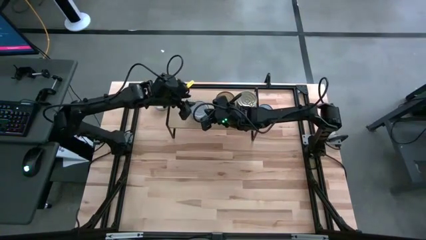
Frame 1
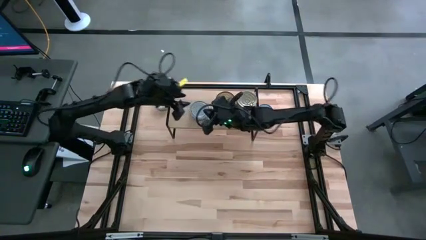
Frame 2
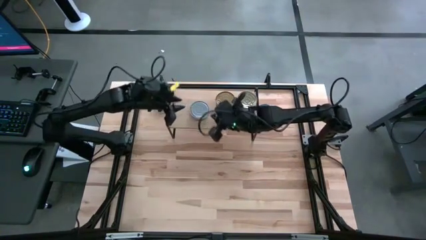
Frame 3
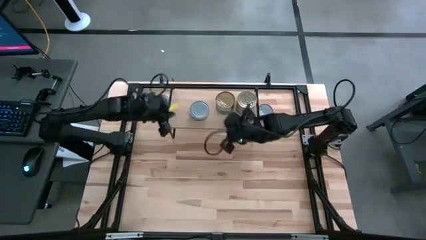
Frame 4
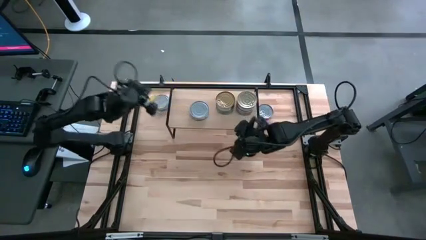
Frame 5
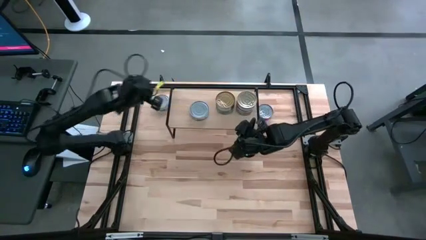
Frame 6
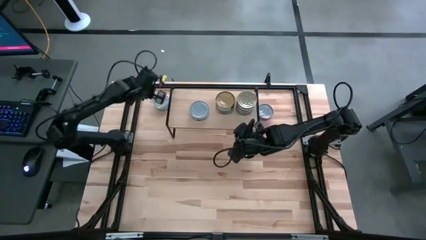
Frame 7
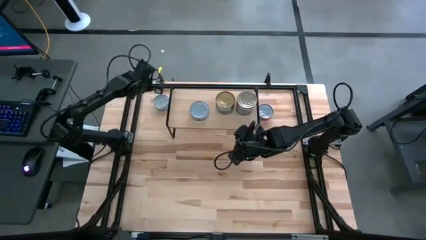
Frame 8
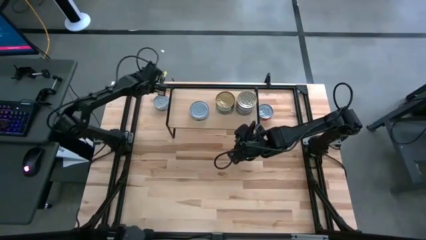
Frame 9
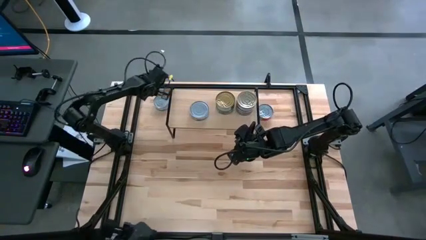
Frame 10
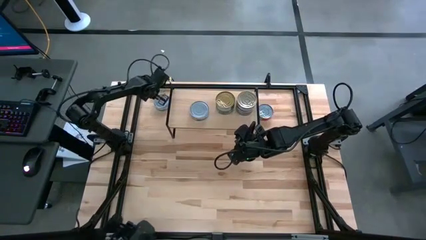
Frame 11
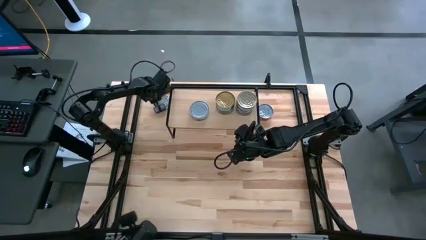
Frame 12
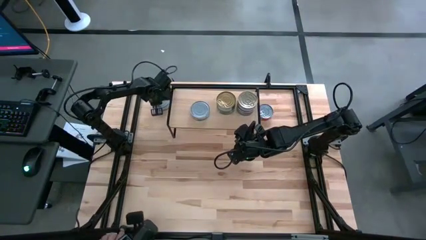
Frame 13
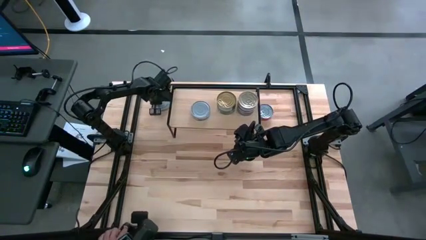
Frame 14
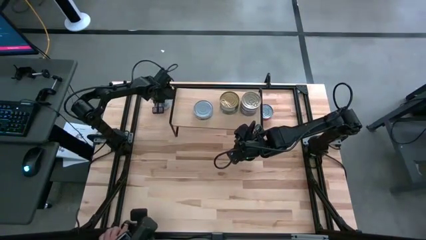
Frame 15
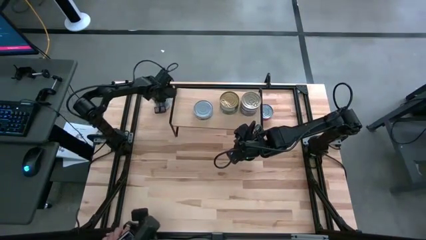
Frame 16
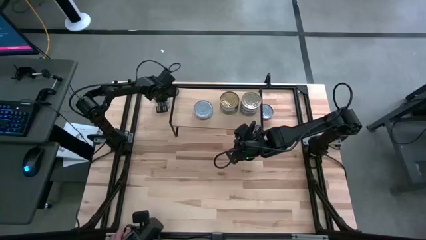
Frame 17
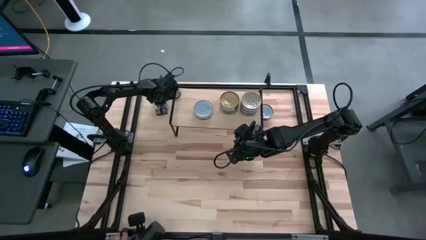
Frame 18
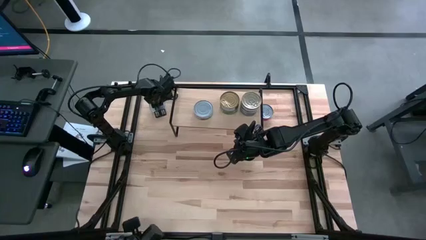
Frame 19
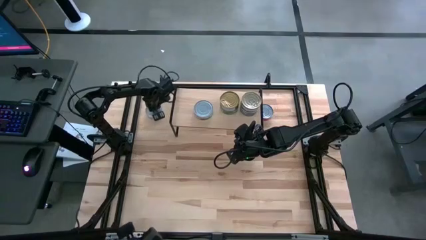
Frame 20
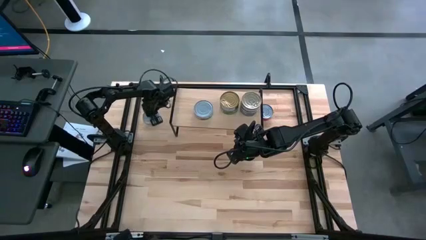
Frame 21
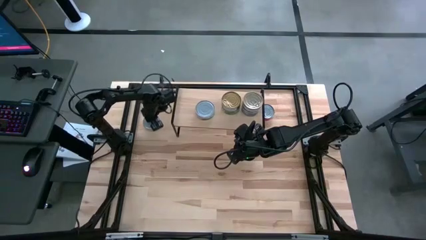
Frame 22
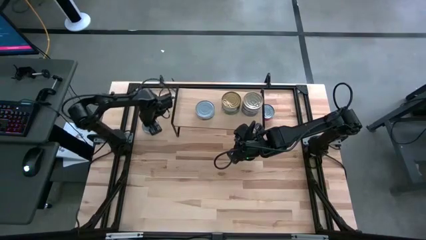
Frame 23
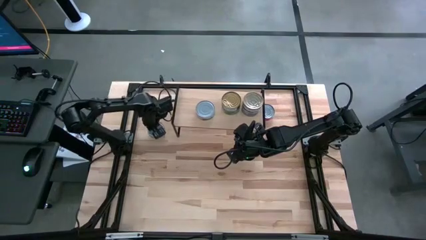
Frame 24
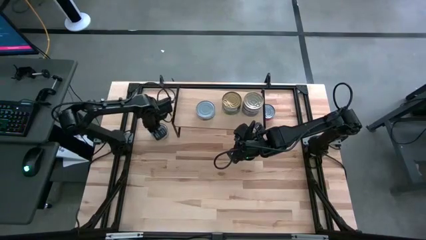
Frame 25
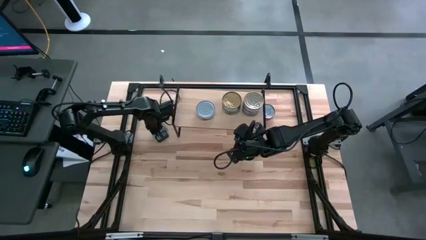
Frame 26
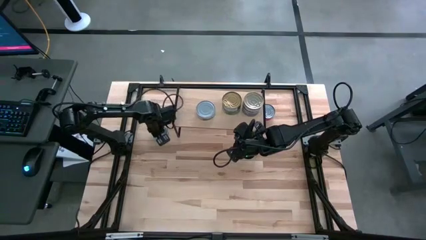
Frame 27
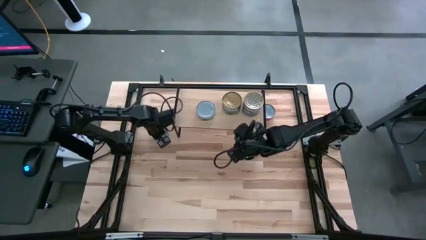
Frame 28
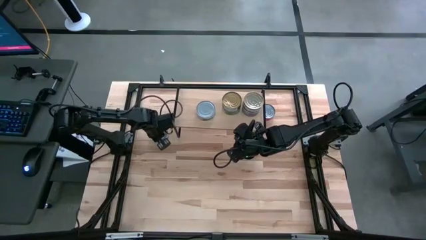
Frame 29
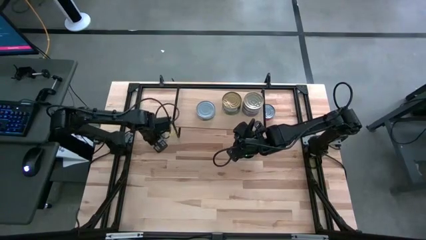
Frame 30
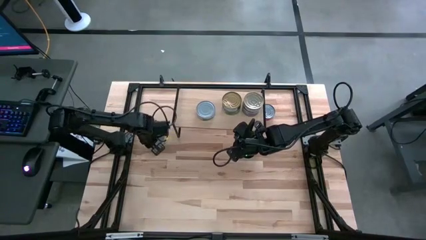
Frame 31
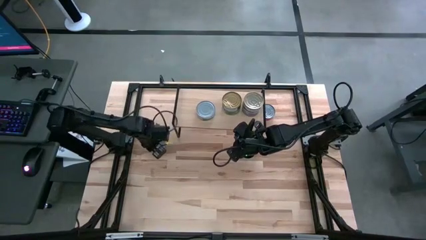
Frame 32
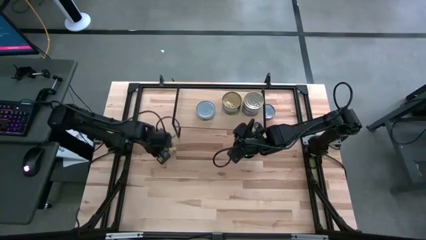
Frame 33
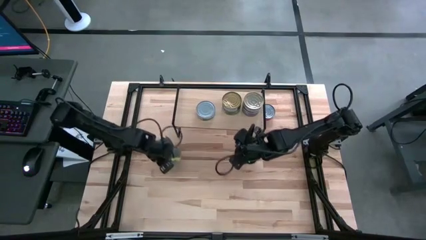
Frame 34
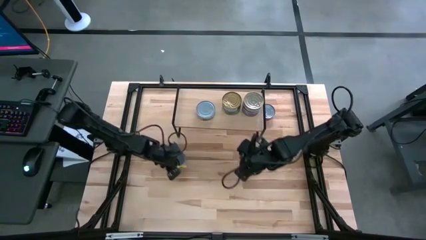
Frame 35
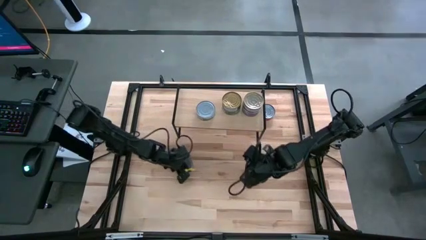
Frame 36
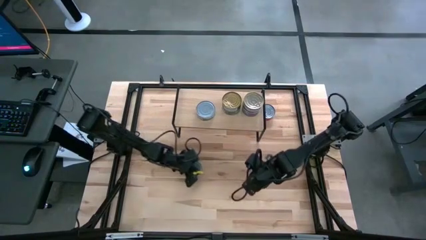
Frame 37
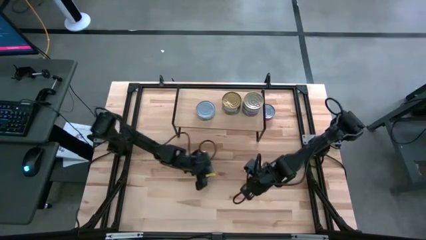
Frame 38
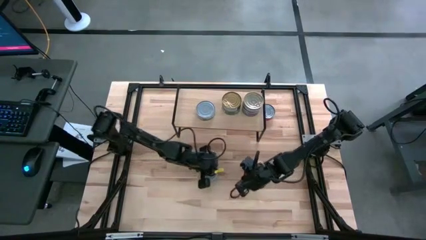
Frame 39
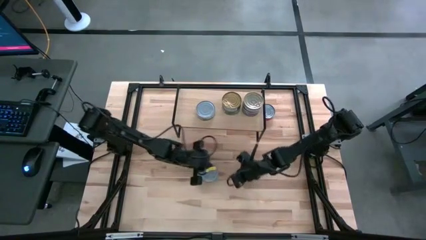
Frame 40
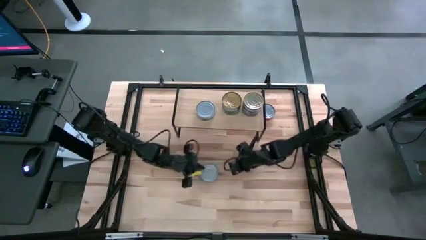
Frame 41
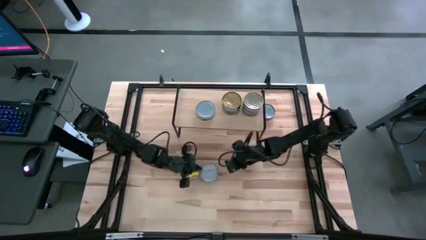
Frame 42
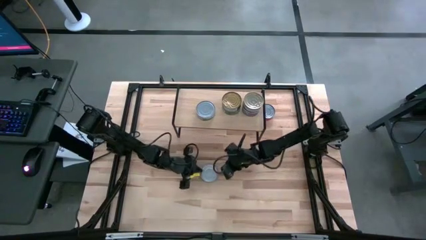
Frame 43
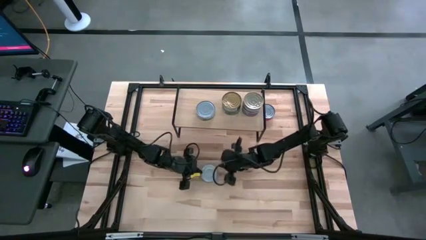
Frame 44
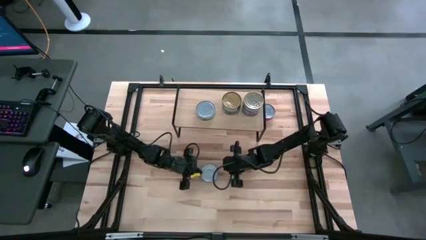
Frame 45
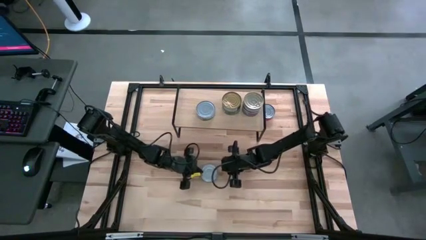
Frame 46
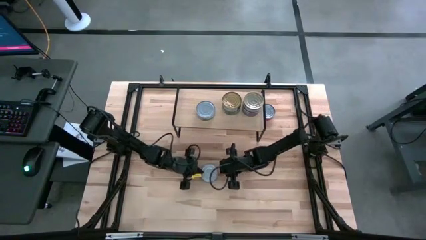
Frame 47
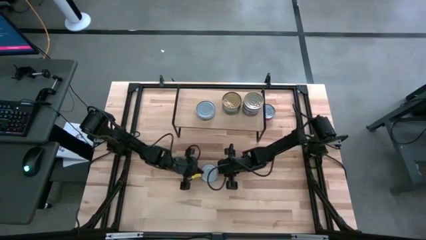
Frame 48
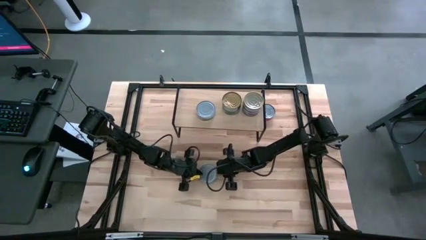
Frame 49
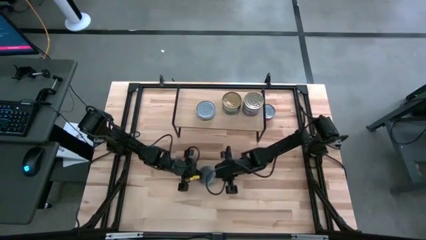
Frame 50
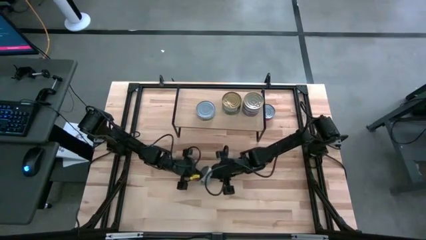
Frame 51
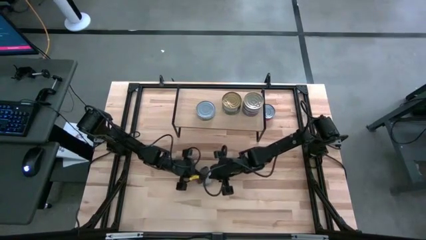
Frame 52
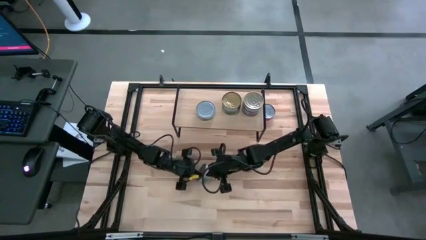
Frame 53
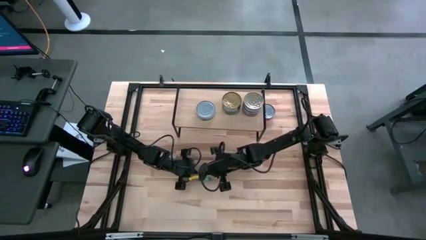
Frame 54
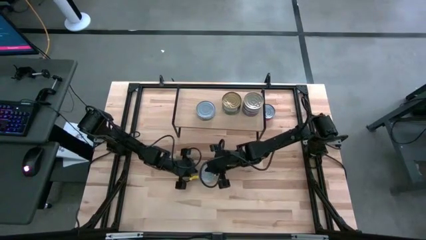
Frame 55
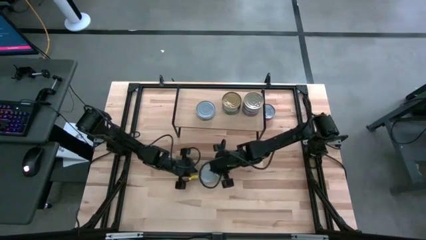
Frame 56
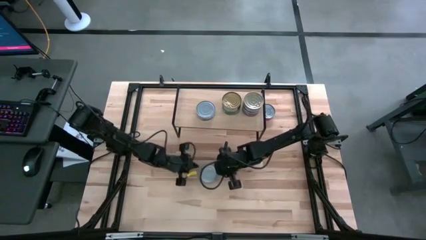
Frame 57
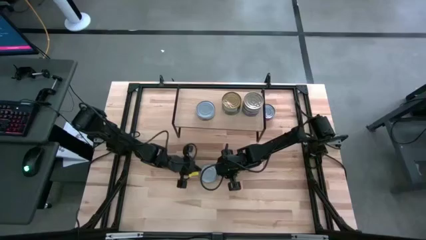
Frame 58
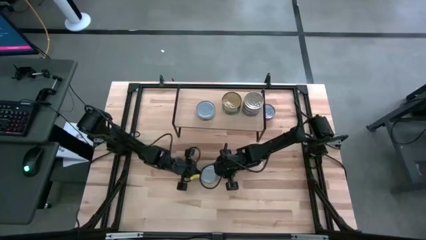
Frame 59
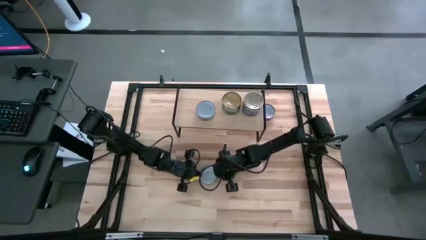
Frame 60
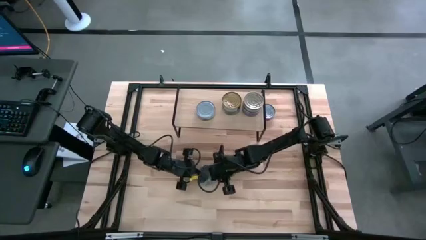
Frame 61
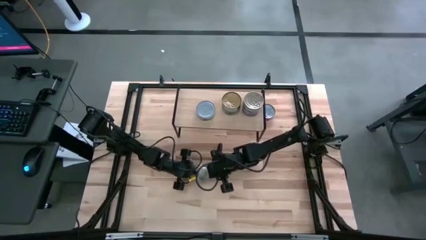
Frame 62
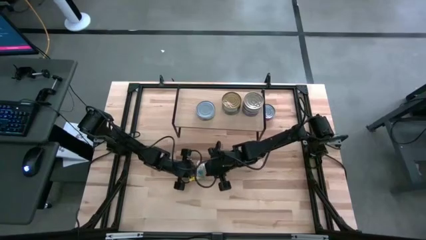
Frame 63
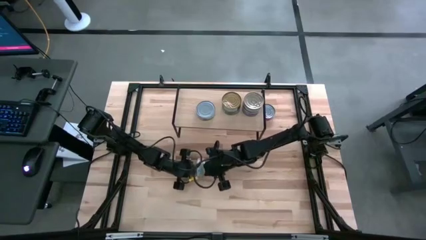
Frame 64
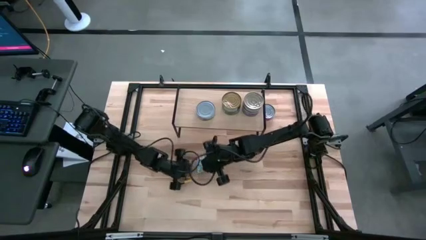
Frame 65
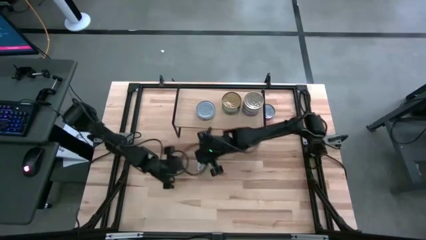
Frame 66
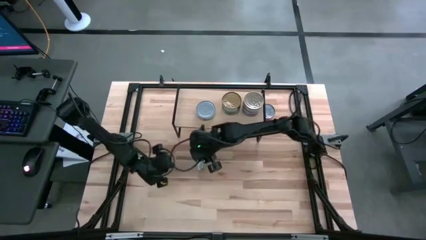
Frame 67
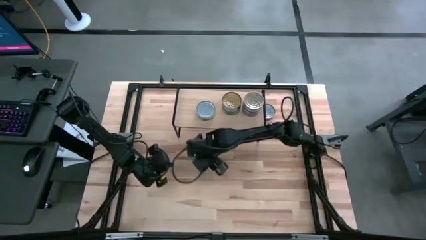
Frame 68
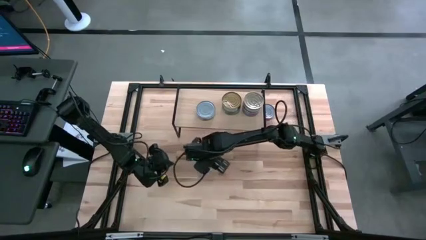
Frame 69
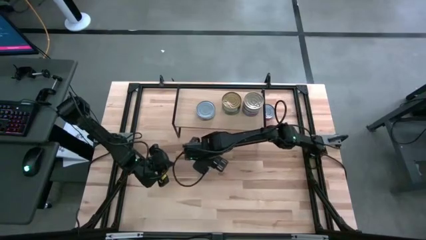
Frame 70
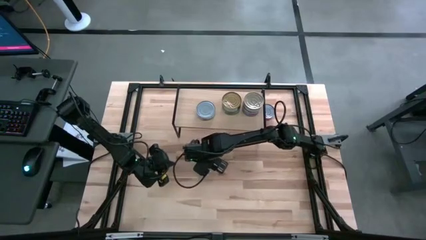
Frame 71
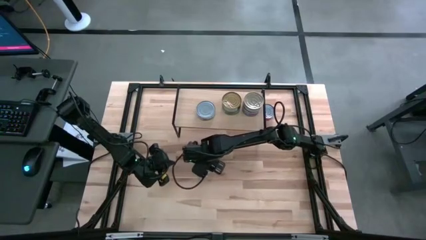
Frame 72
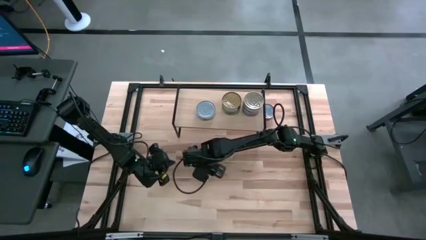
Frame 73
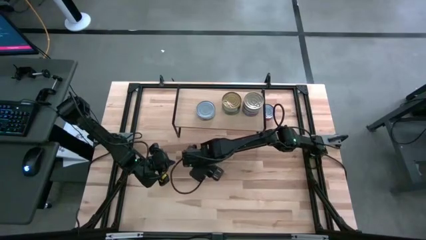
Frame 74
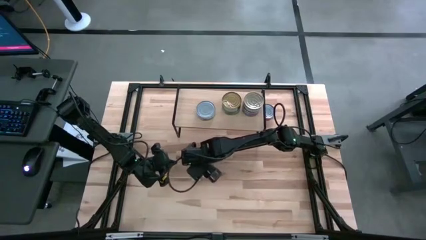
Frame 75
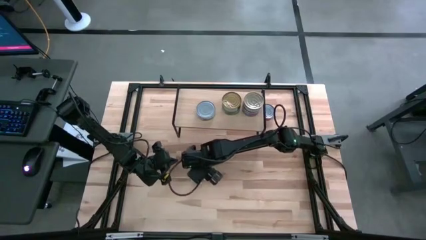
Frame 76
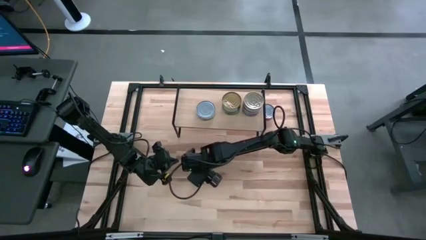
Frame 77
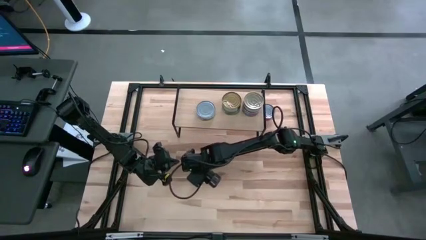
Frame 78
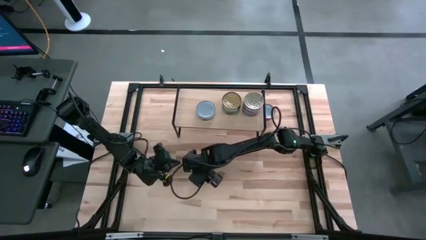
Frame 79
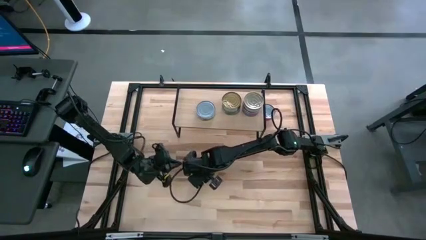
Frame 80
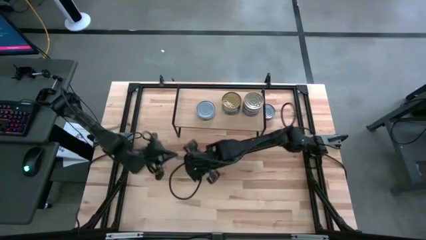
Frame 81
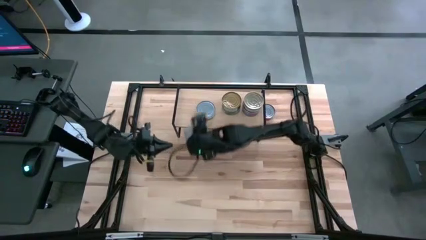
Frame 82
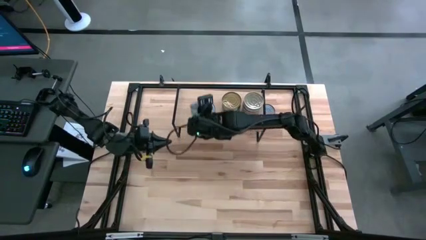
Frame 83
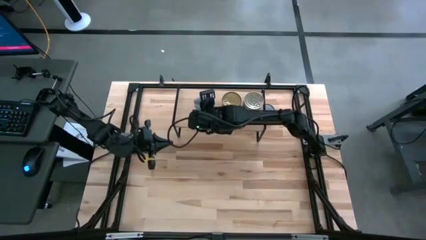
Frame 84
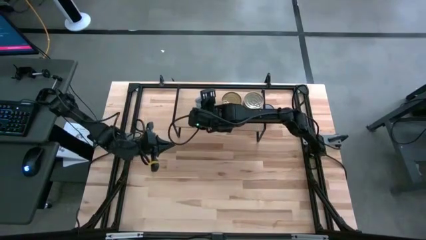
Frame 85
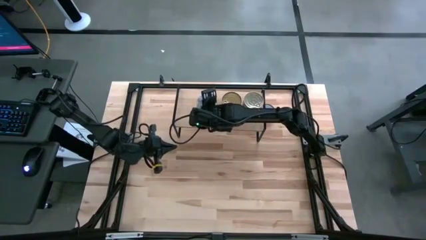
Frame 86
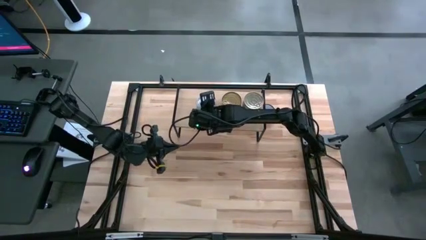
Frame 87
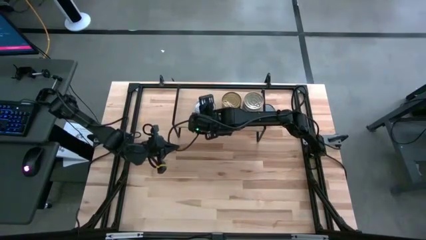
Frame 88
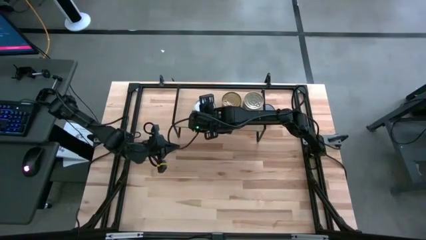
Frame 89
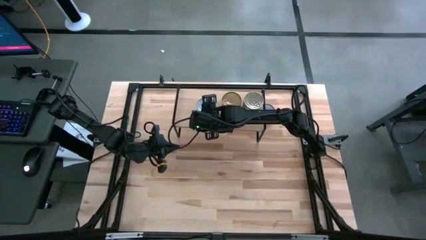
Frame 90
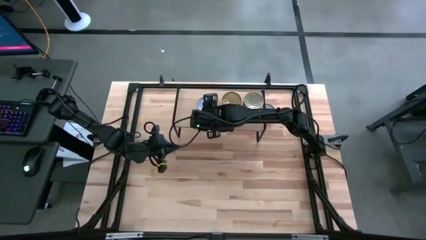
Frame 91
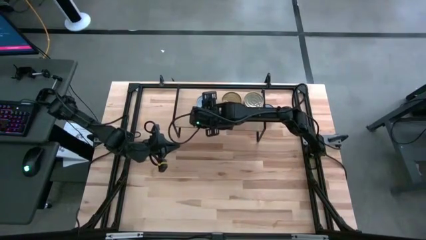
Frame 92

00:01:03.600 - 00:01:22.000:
Task: Stack canned seafood by type on shelf
Stack the green white tuna can on the other green white tuna can on the shelf
